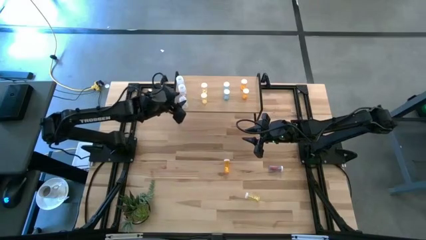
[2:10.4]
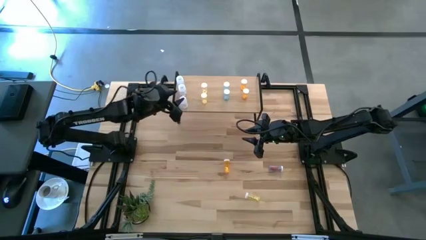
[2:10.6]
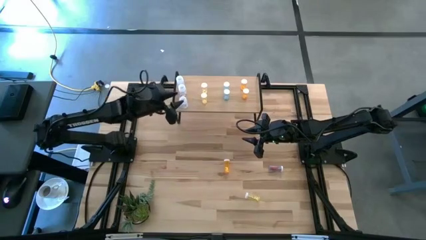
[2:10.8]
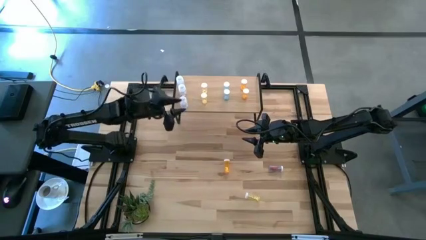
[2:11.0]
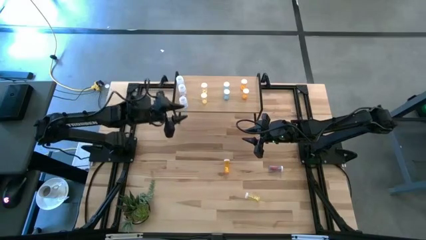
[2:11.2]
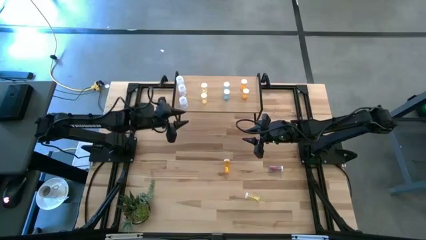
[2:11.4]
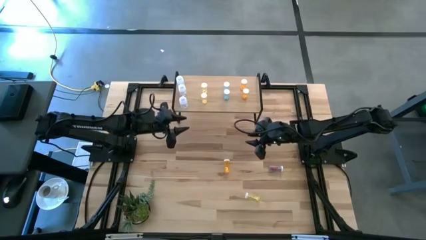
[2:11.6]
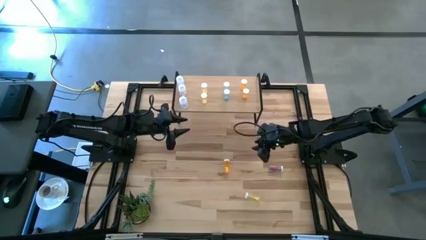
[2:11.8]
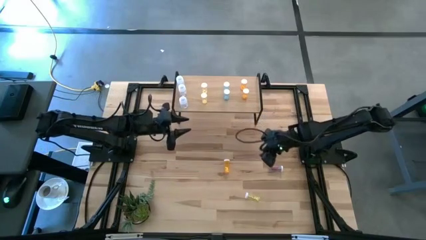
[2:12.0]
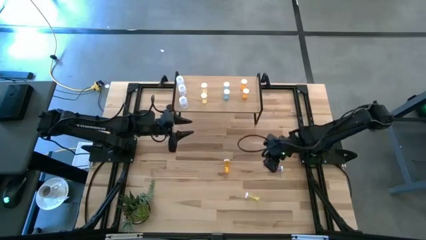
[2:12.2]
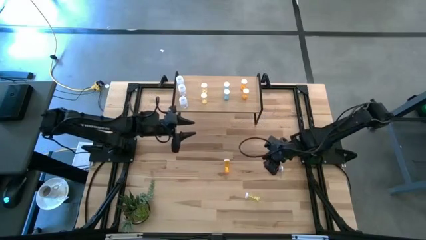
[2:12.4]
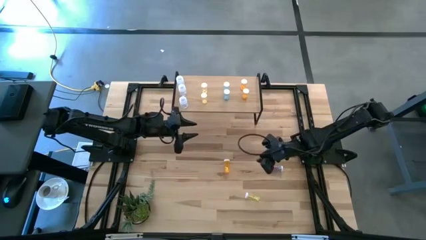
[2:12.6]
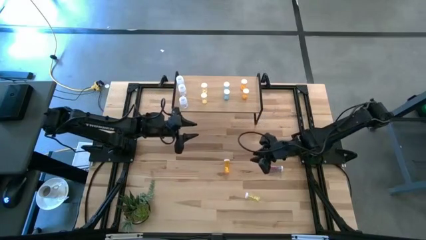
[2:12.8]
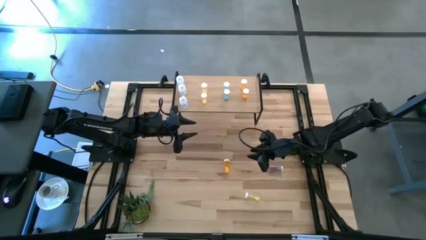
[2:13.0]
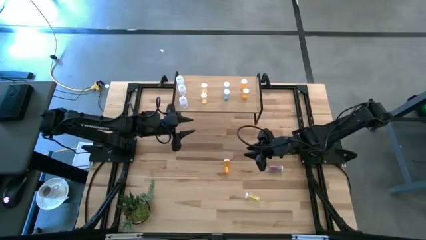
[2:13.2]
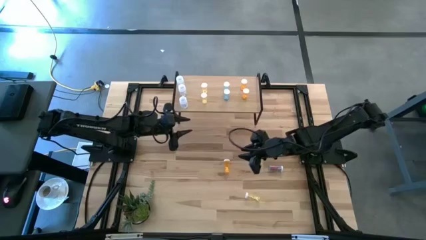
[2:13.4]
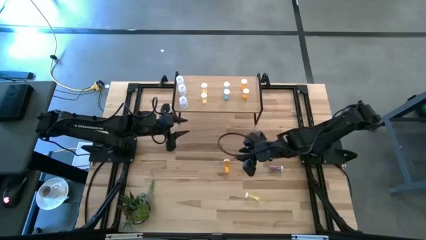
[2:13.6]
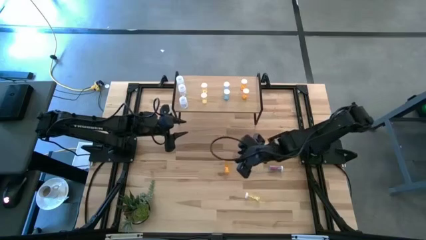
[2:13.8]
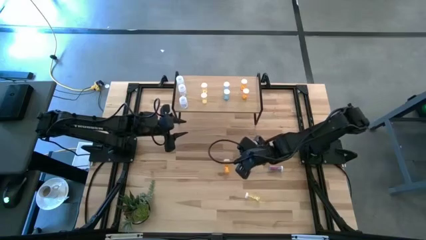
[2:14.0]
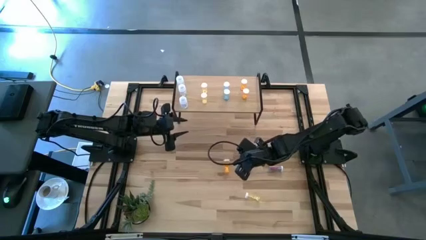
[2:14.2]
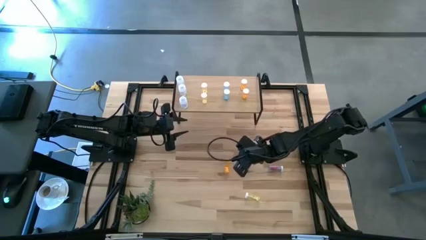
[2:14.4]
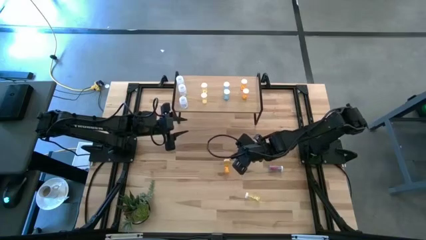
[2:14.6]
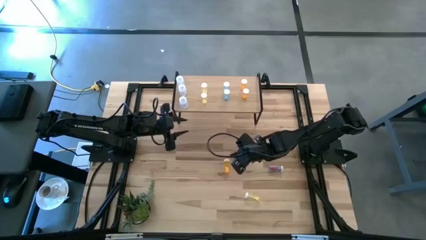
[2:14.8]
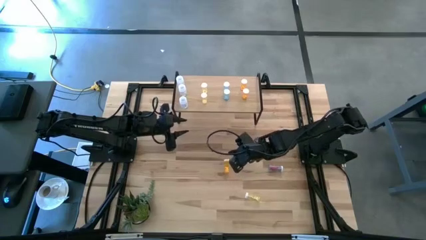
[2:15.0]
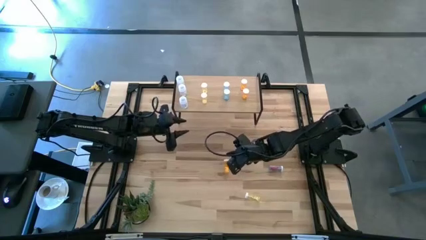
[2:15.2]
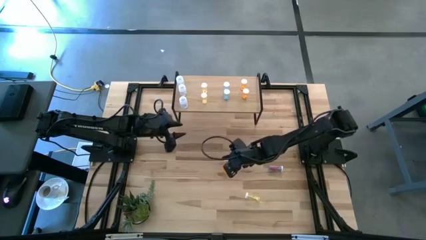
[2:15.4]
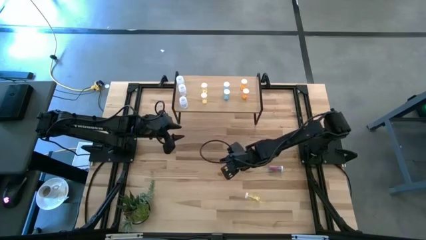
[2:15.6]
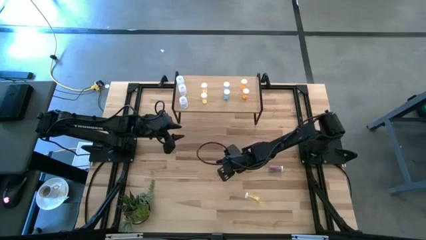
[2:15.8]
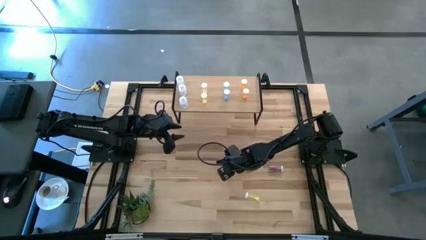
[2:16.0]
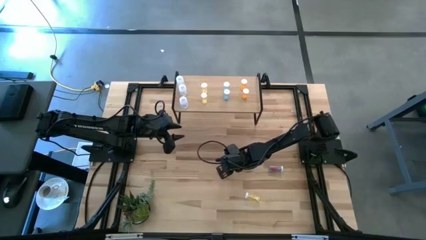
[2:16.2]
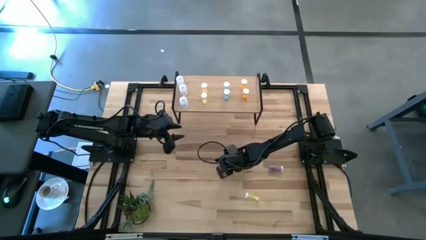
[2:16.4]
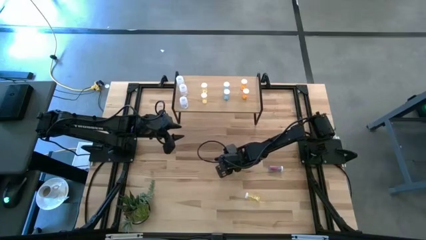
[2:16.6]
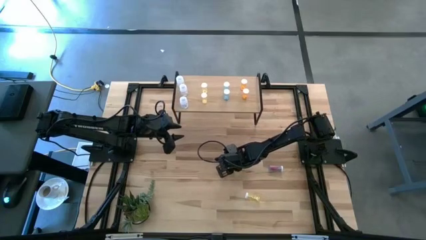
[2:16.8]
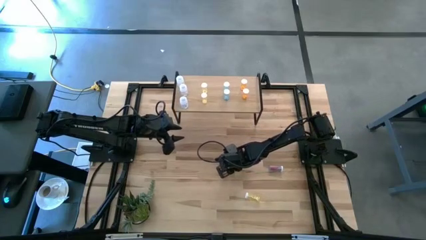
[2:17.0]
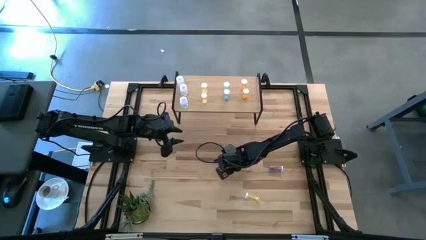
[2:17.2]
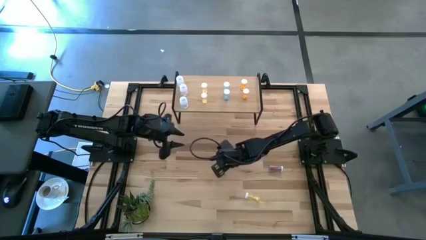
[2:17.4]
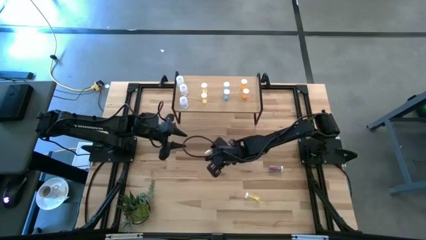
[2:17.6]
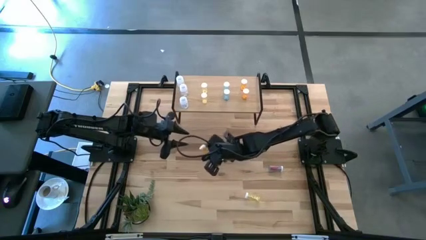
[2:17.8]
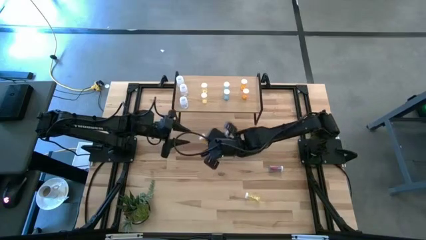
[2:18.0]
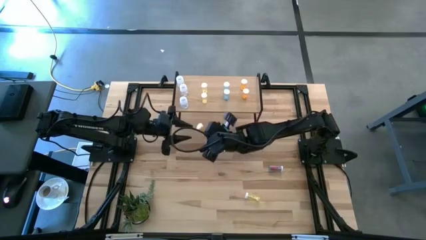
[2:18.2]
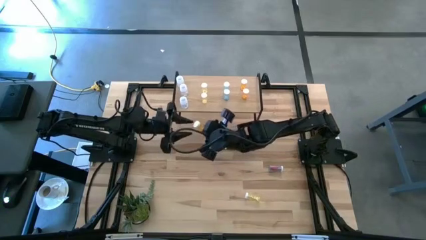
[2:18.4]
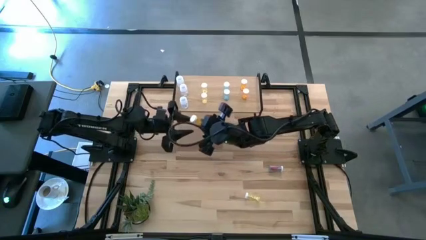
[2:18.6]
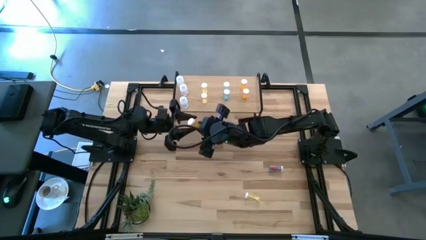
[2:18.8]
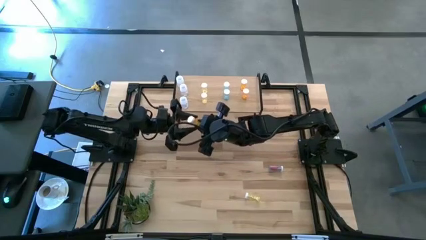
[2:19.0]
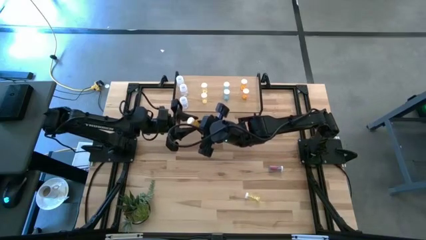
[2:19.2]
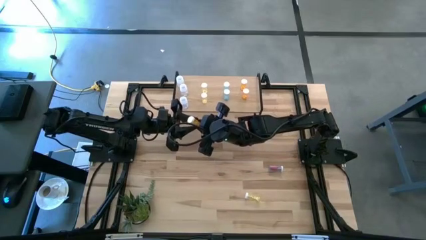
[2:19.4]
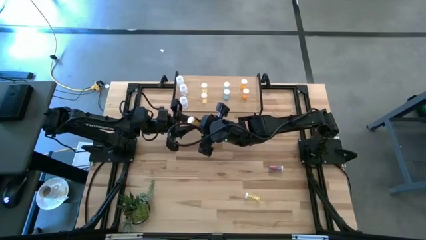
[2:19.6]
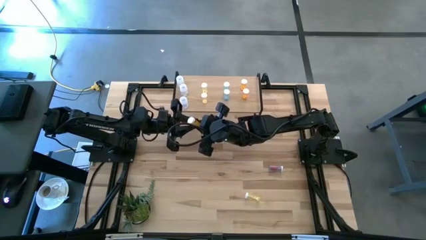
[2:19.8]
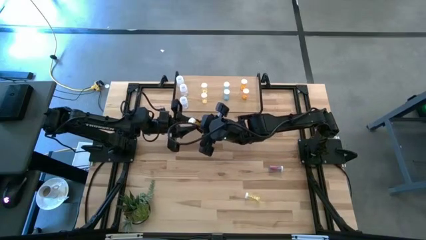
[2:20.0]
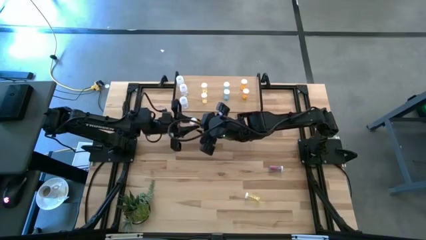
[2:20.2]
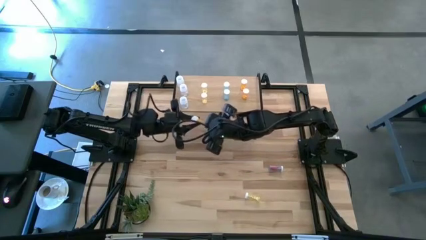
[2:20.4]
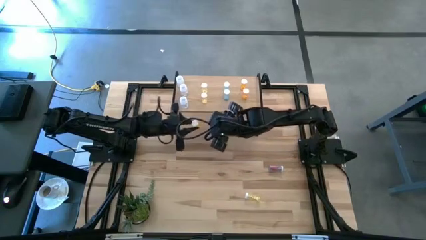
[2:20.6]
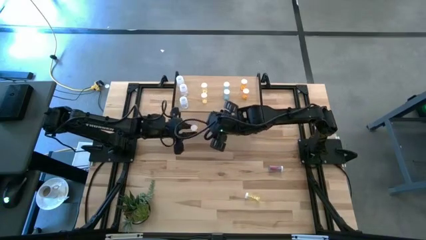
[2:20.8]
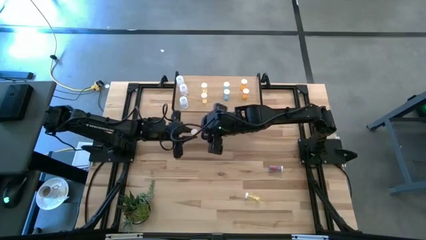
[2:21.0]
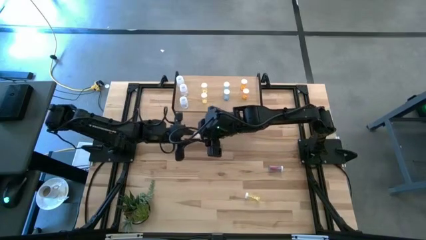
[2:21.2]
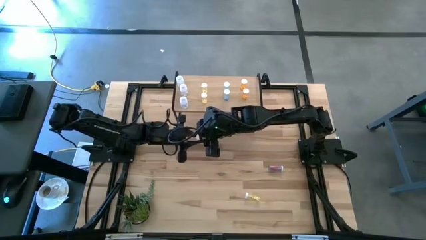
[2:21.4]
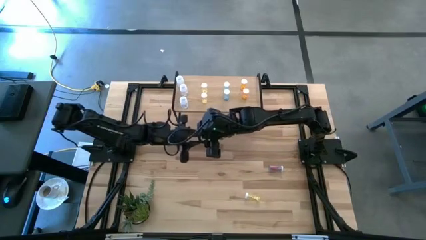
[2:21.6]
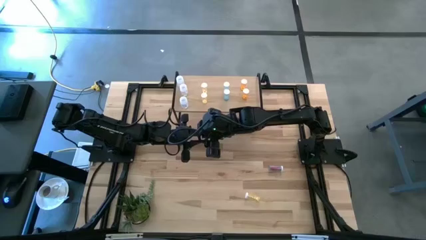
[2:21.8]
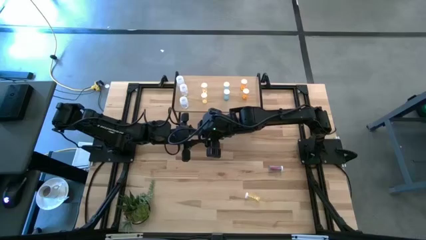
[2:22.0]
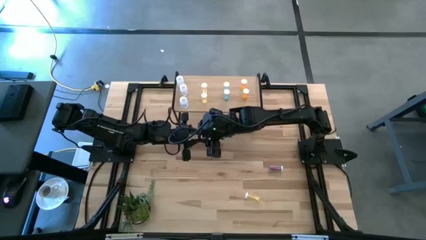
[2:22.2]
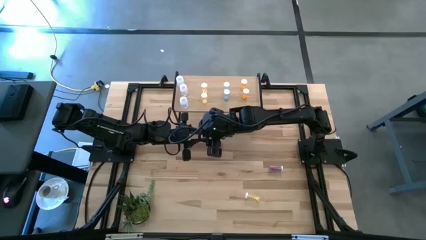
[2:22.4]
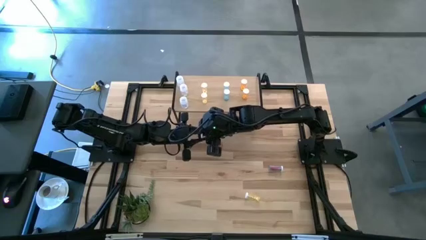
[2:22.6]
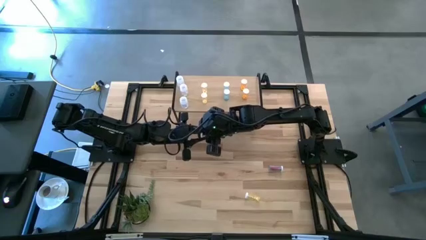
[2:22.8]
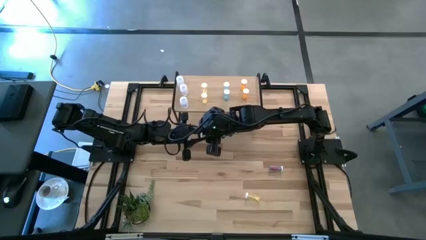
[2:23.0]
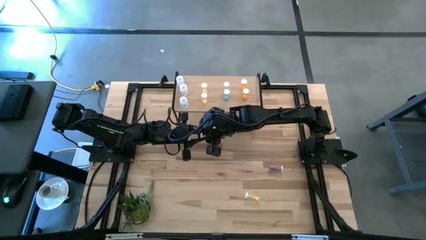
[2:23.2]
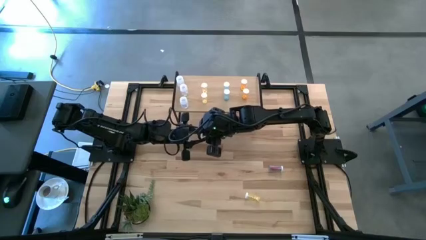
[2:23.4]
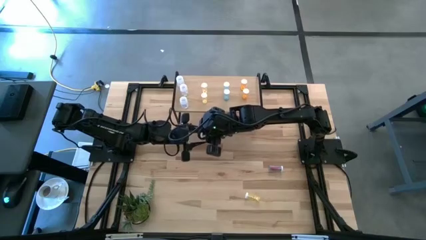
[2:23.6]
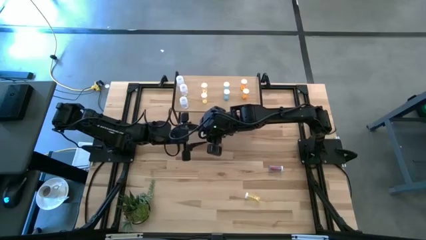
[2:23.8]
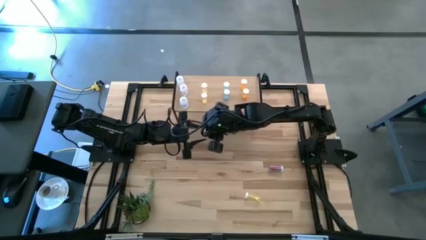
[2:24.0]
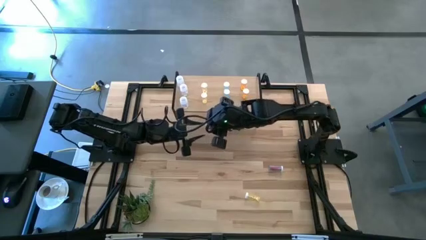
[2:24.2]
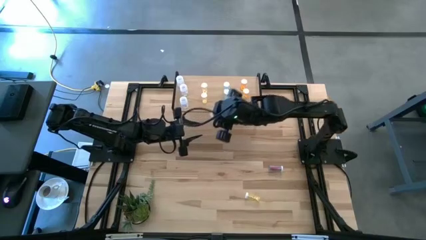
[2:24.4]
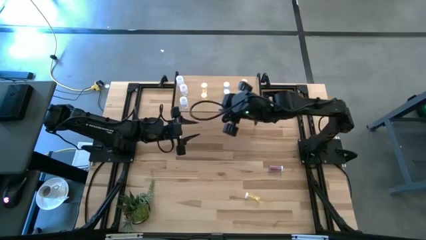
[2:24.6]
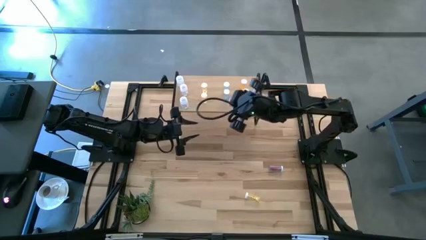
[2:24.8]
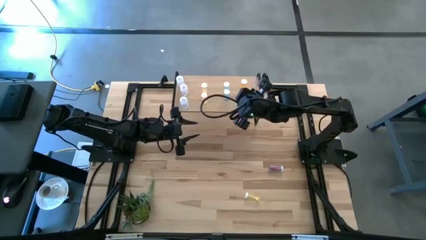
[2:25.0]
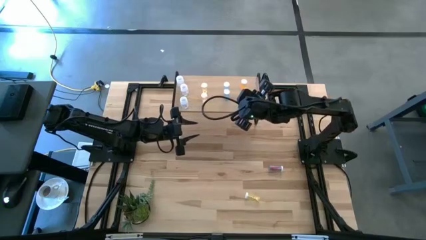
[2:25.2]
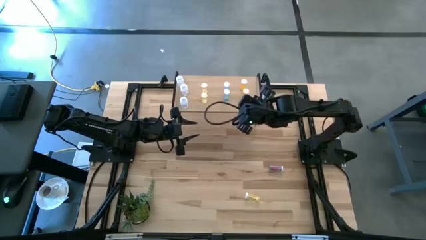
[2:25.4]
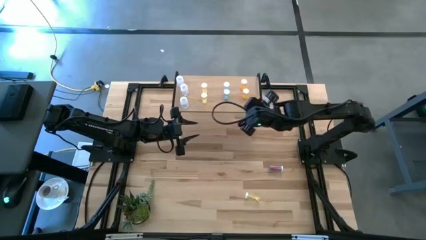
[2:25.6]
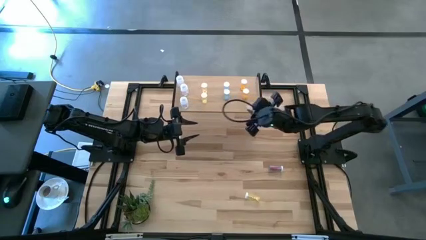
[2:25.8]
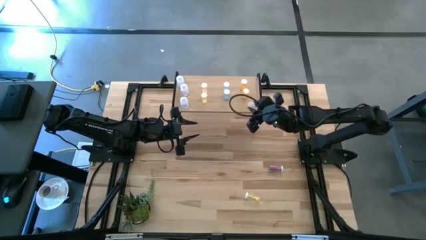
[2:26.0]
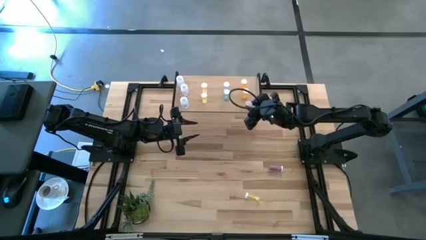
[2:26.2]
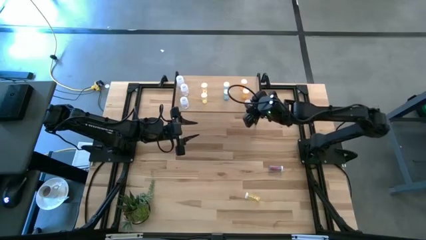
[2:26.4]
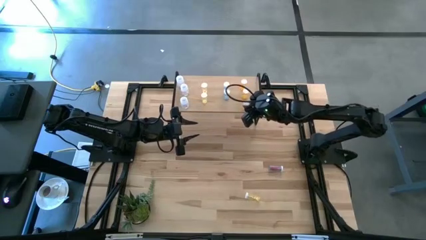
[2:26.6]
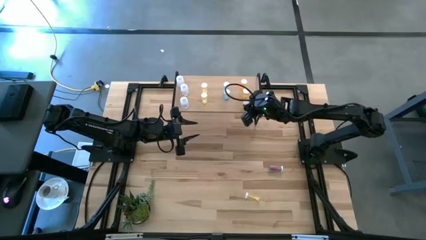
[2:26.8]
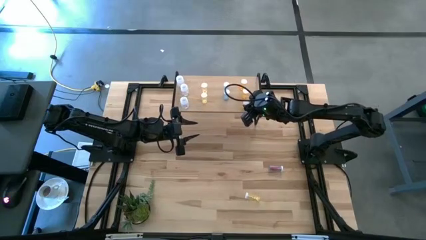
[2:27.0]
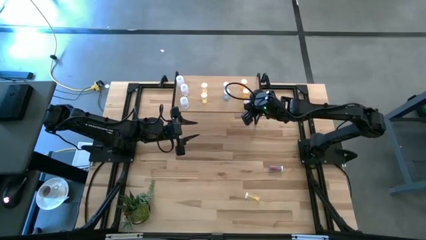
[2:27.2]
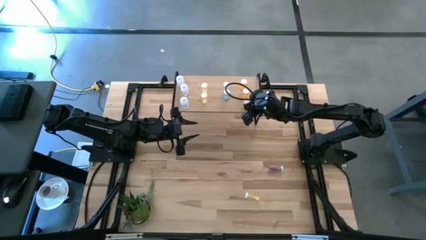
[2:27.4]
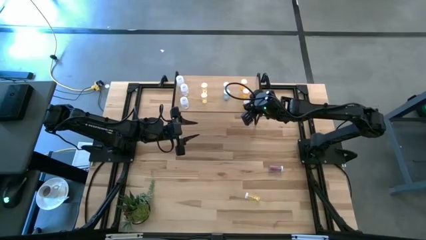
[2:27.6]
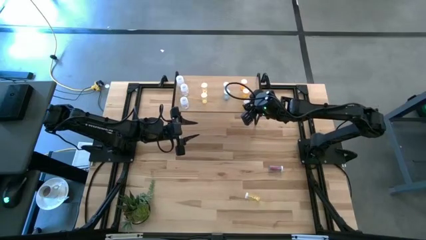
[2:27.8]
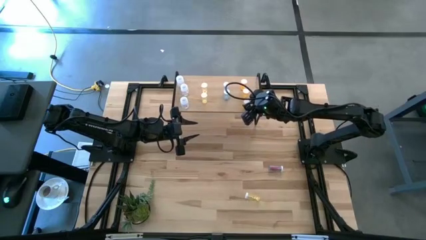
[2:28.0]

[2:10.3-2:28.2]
Task: Pick and place medicine bottles onto shelf by color
Put the orange pill bottle on the shelf aligned with the other orange pill bottles
